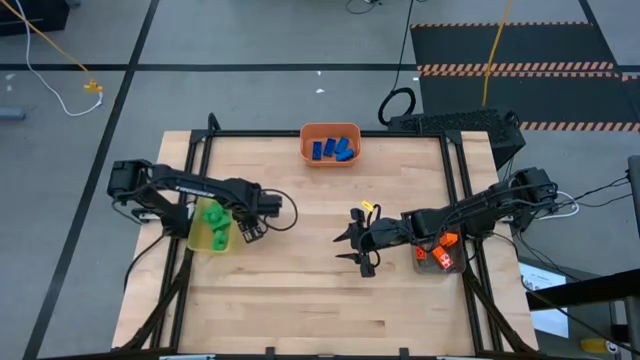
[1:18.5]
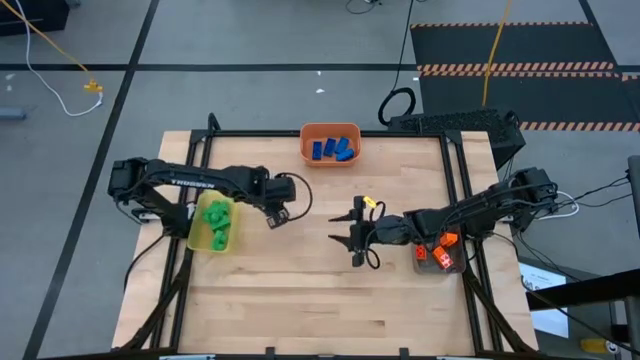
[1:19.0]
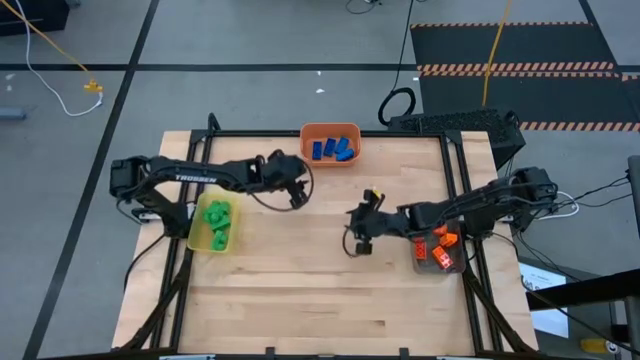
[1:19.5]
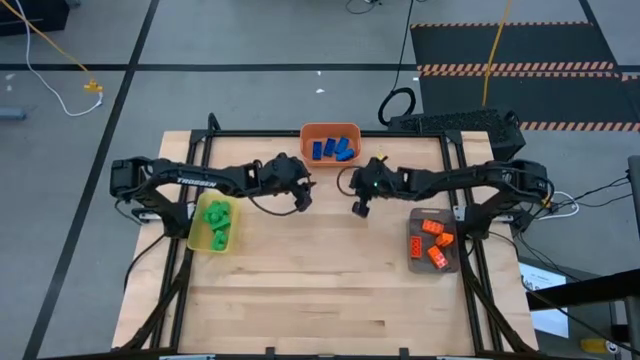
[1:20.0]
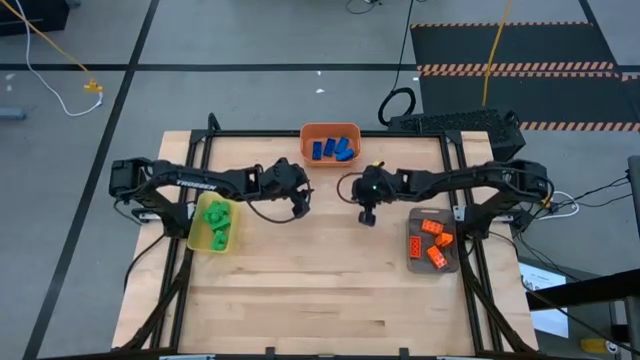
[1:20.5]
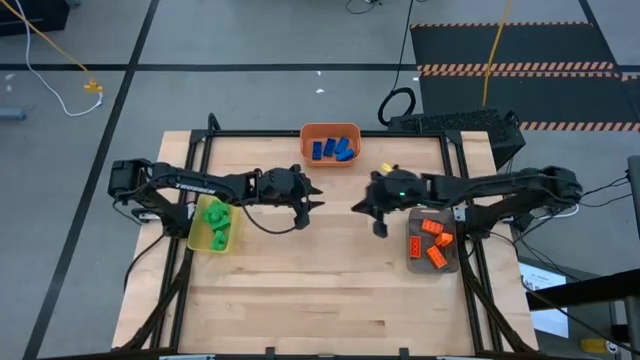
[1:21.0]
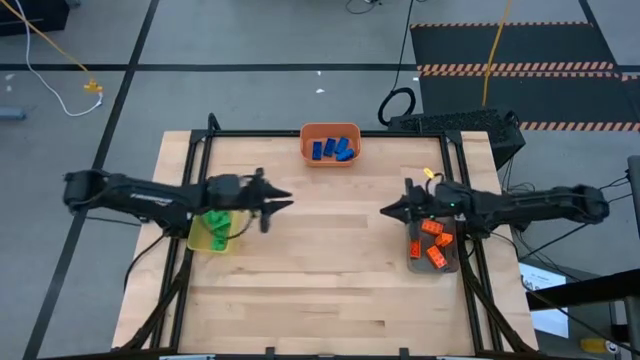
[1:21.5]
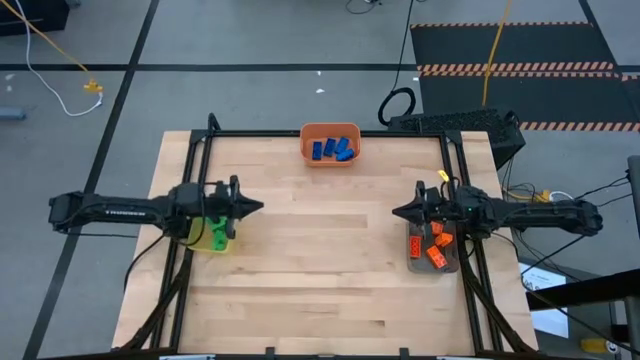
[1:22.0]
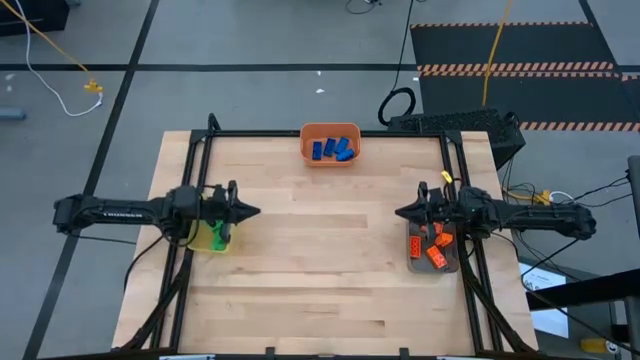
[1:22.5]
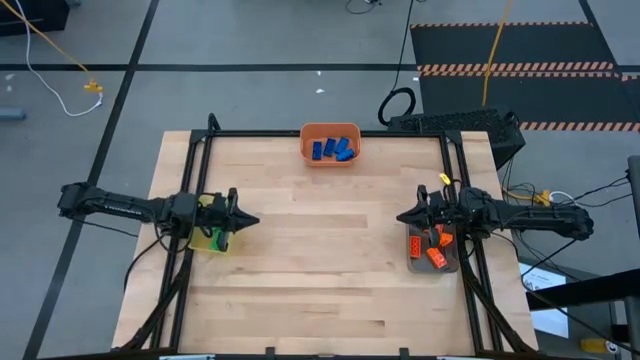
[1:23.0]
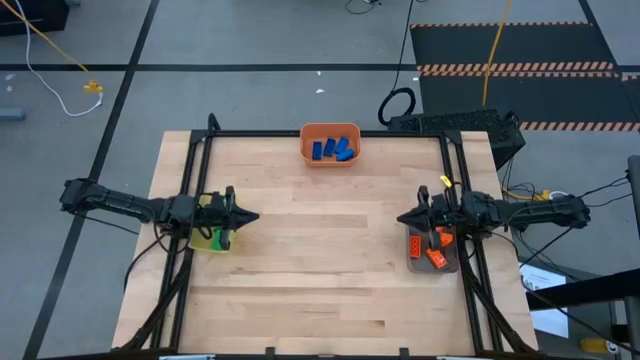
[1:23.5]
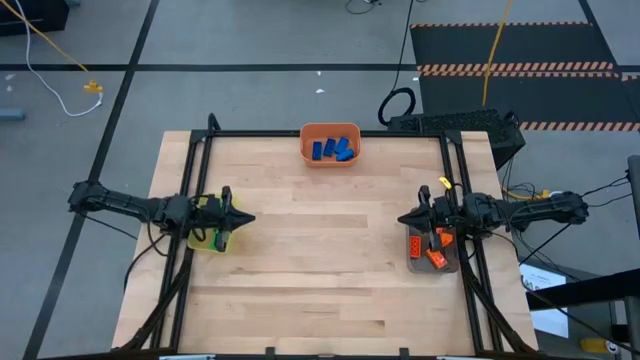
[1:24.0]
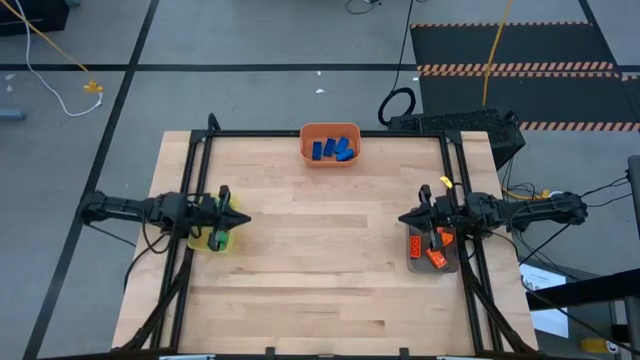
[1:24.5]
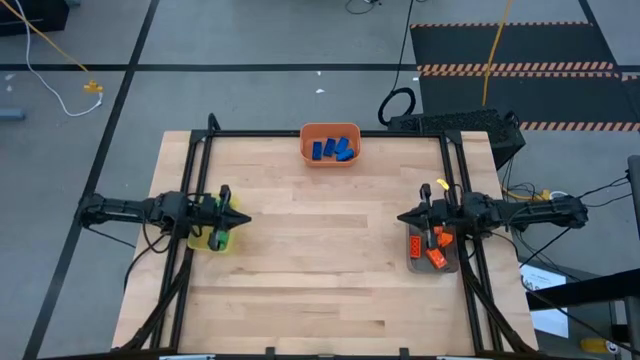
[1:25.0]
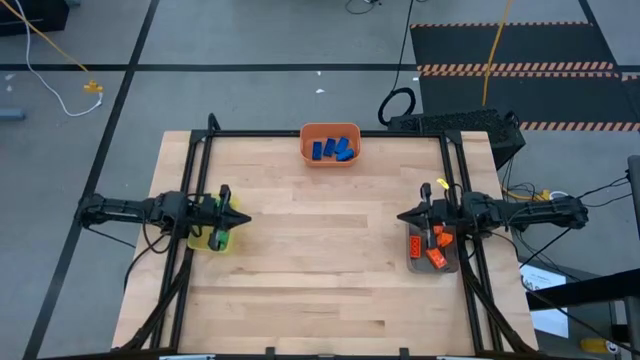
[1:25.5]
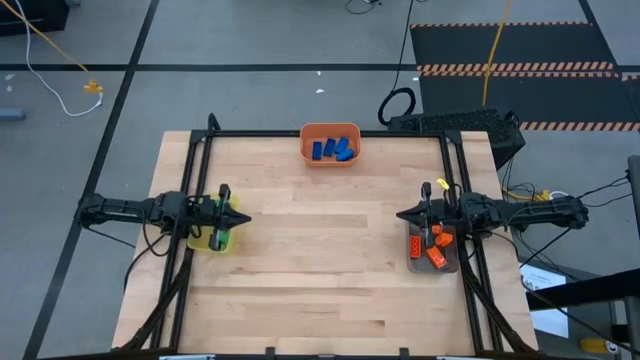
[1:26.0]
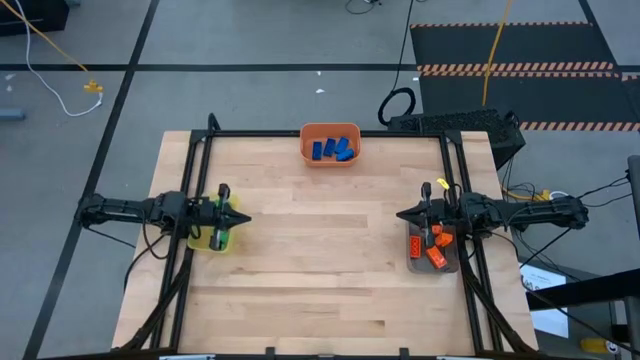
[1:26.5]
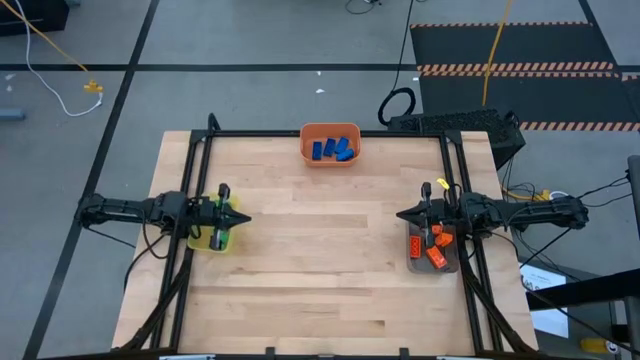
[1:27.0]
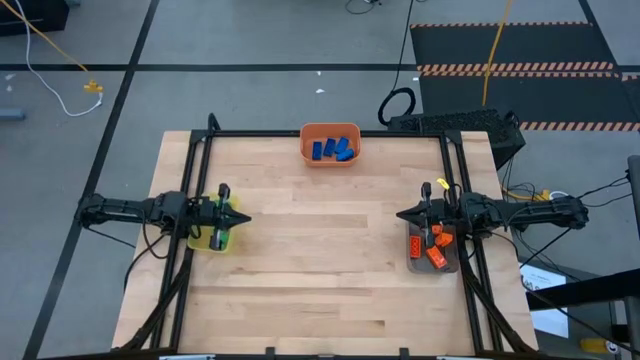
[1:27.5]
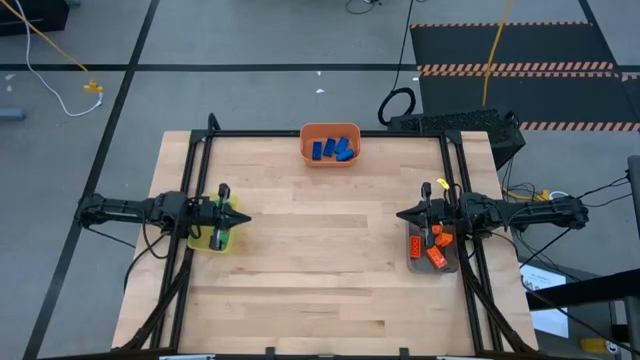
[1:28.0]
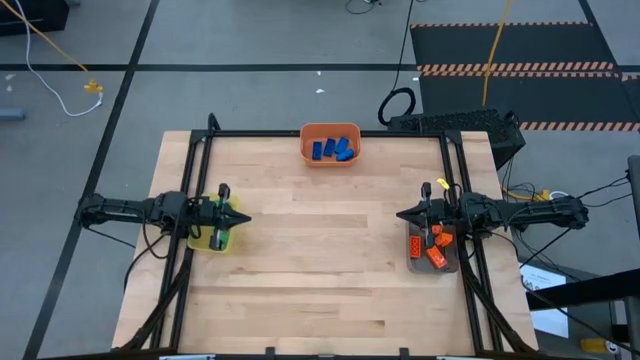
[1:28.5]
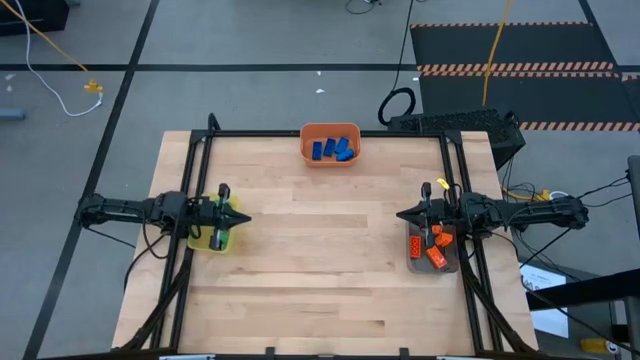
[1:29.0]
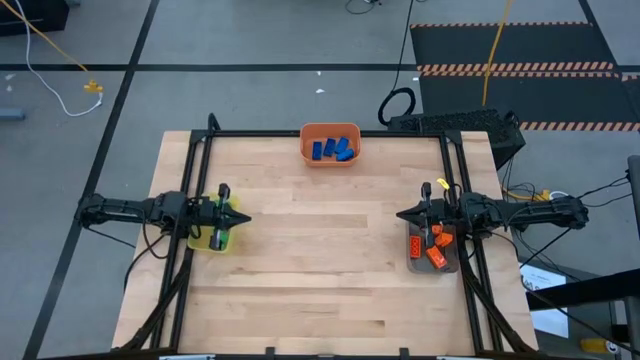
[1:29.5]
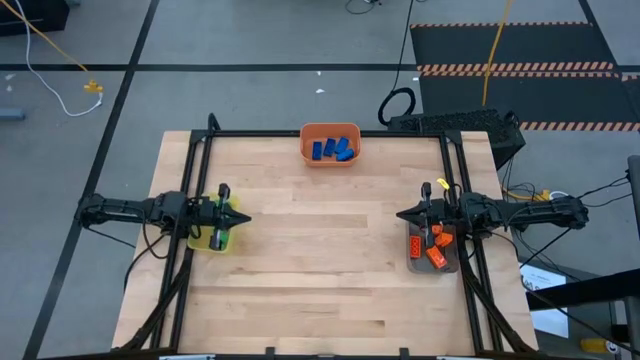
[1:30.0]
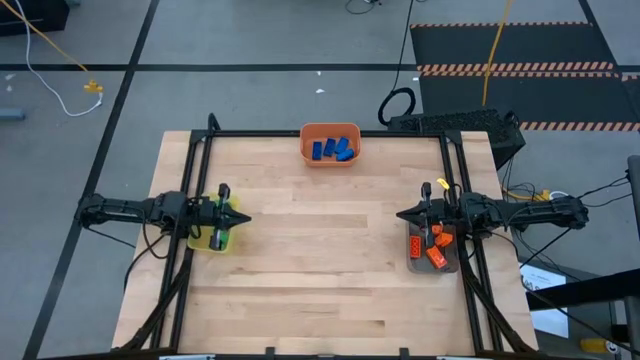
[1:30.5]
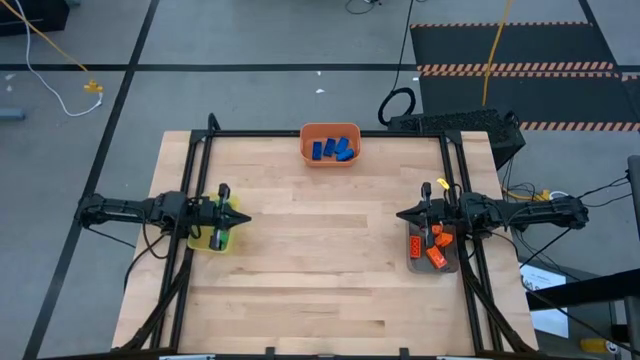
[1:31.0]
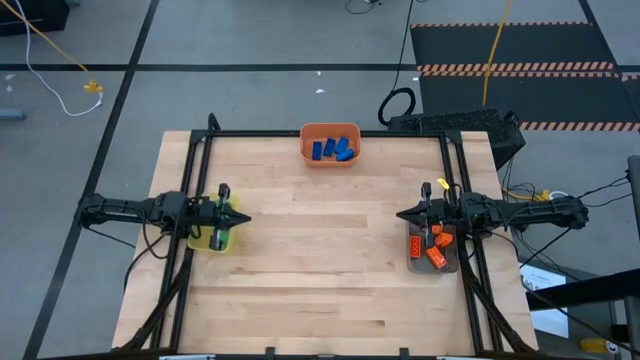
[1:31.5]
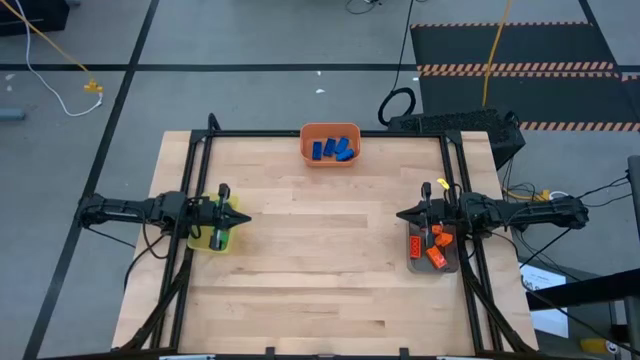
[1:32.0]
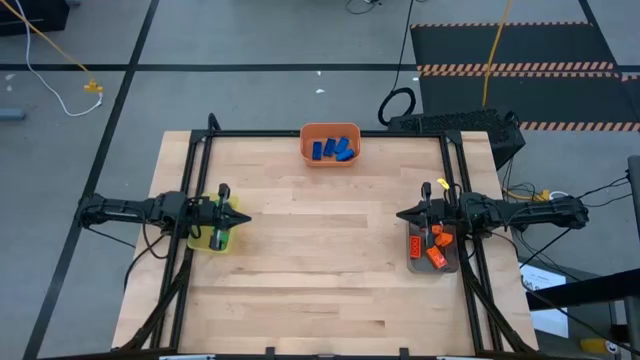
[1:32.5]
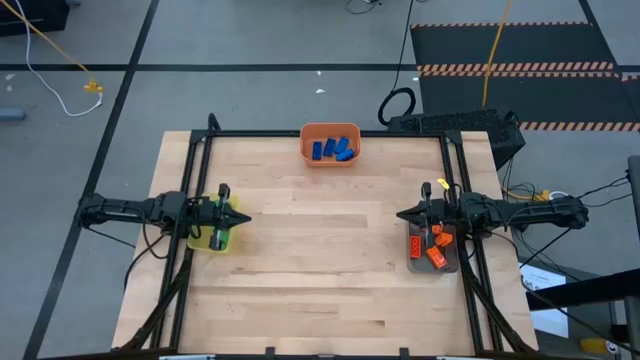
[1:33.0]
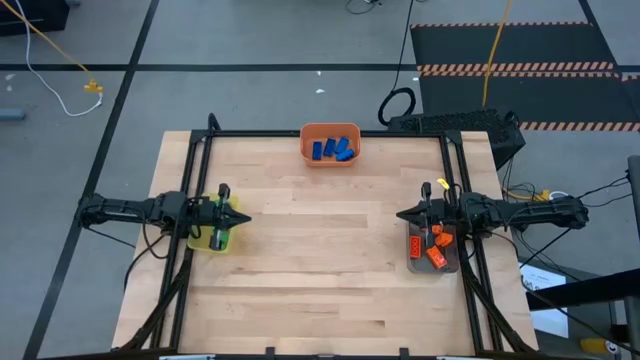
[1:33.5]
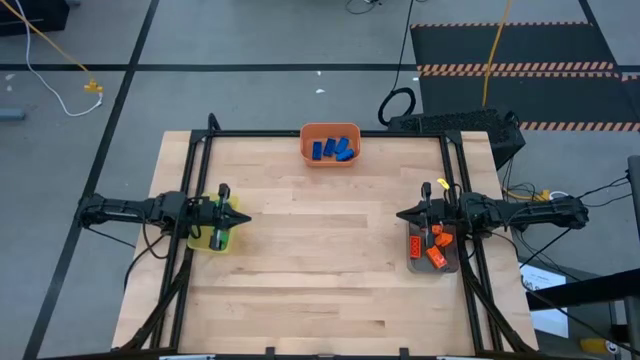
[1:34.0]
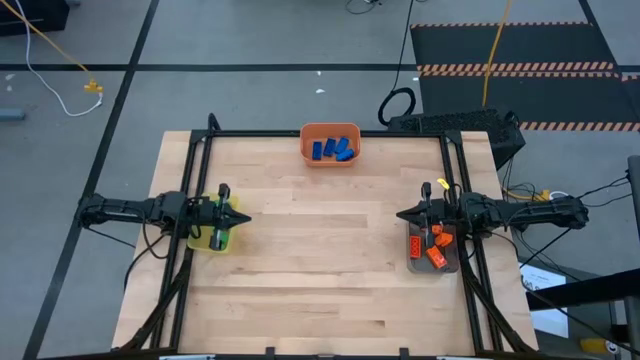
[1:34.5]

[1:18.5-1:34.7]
Task: Sort & place blocks by color
Return to Home Position

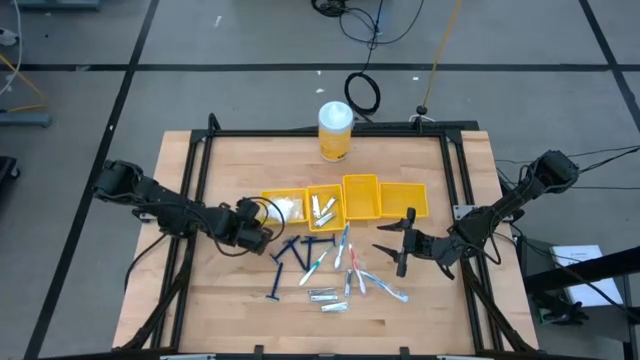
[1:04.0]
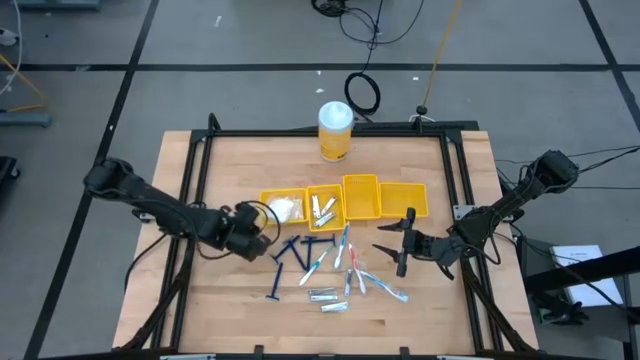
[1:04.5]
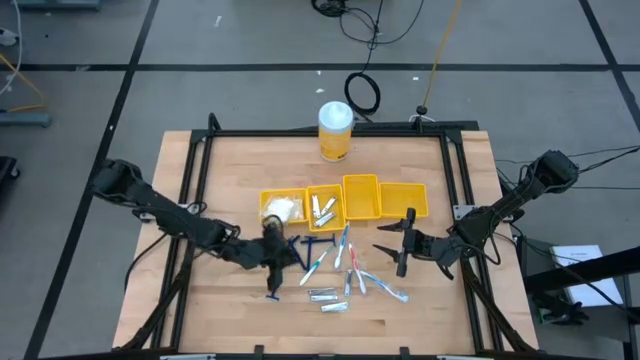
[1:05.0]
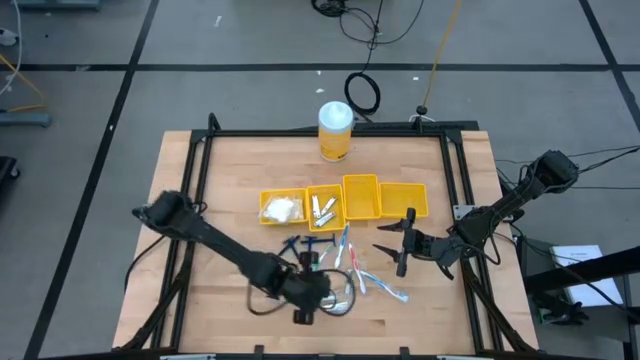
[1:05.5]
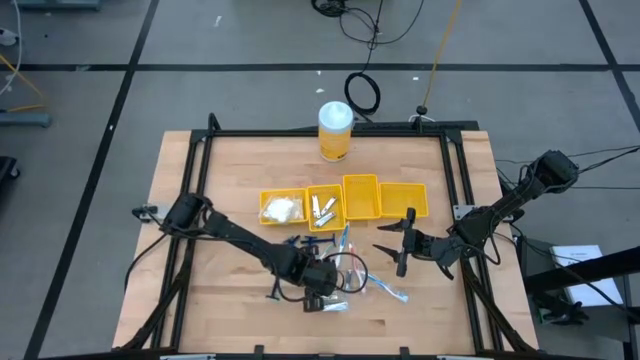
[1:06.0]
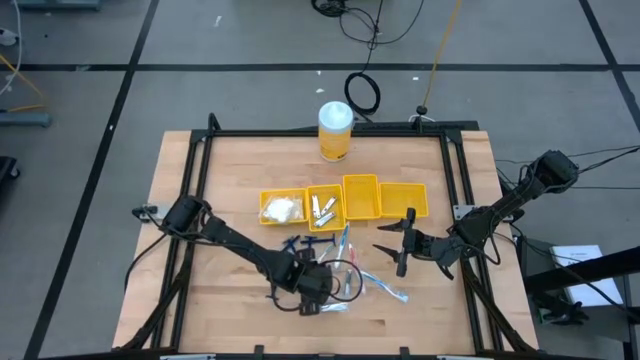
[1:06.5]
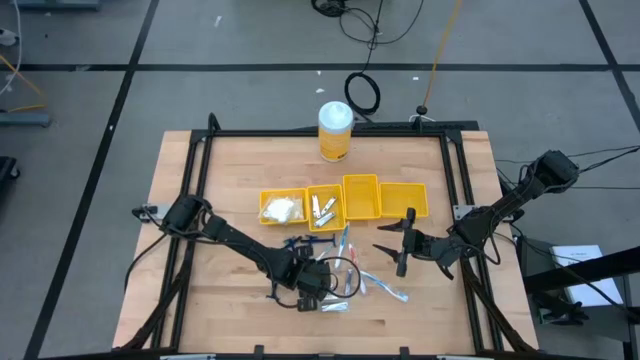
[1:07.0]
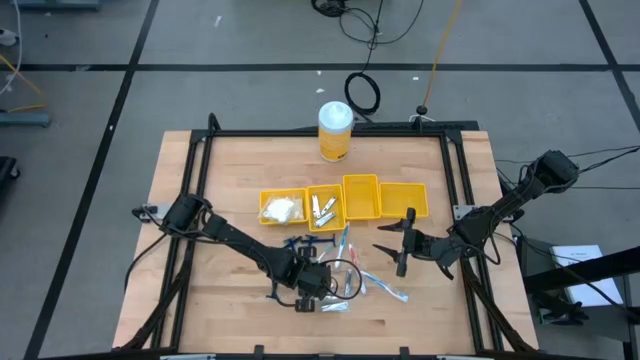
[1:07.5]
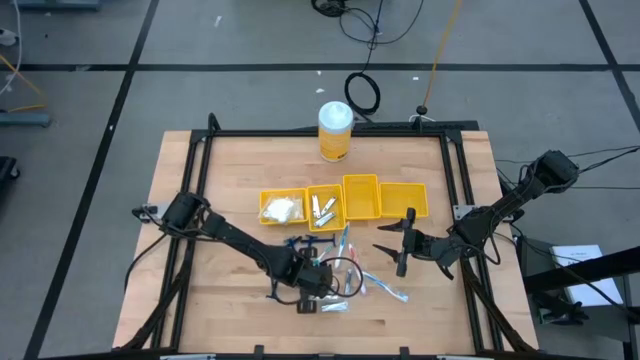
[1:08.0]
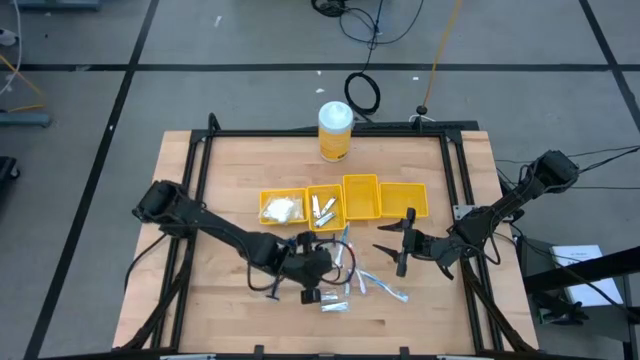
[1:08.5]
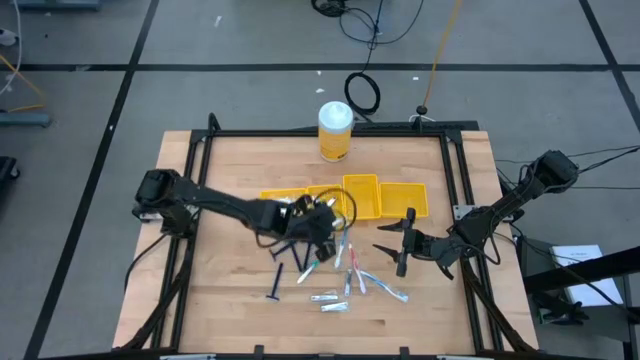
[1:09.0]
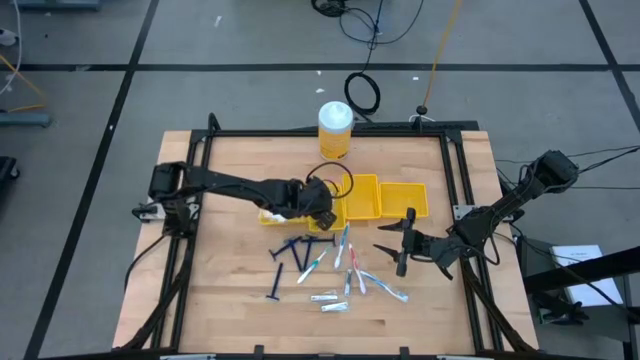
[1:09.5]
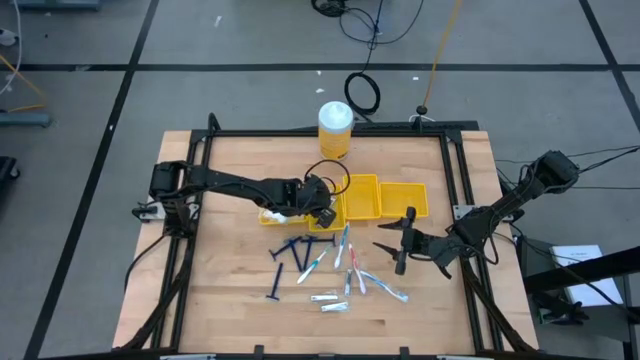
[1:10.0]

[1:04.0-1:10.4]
Task: Pick & Place Travel size toiletries
Put the silver nail cutter into the middle left yellow bin
